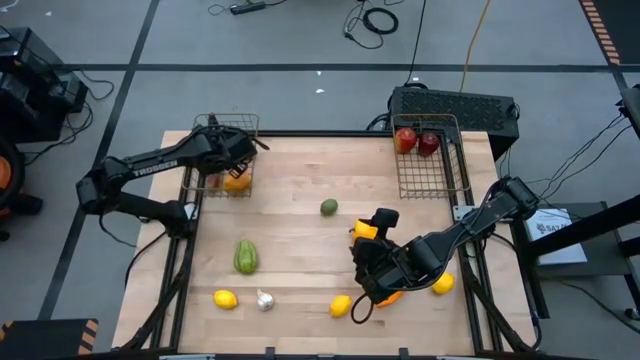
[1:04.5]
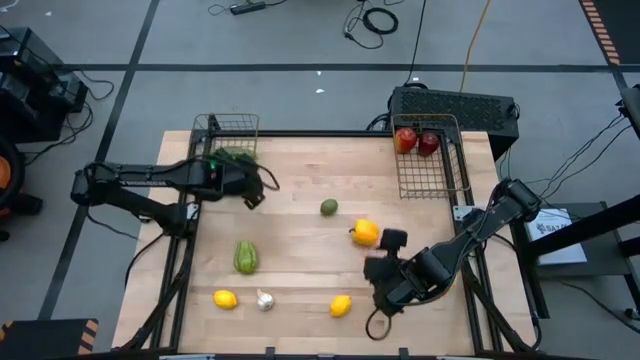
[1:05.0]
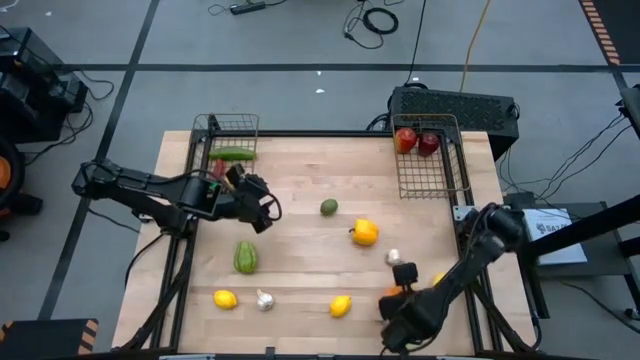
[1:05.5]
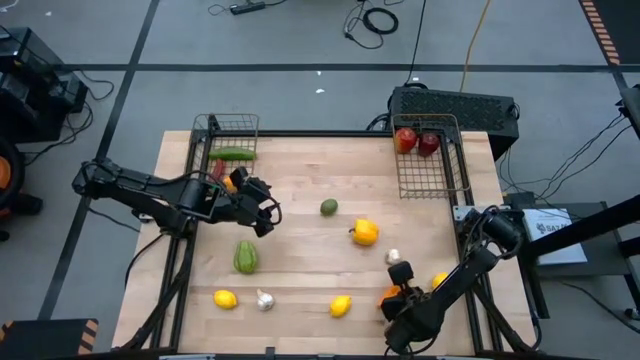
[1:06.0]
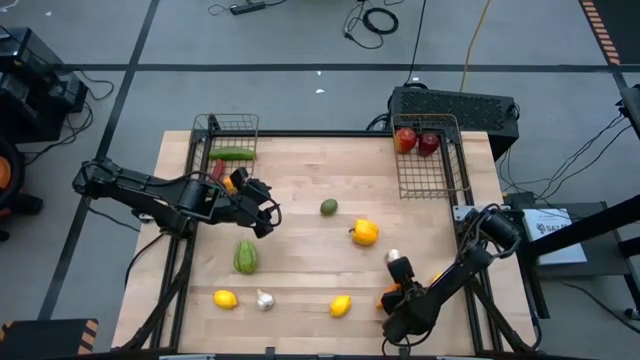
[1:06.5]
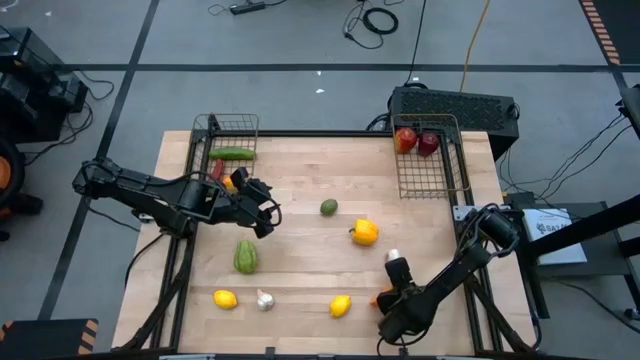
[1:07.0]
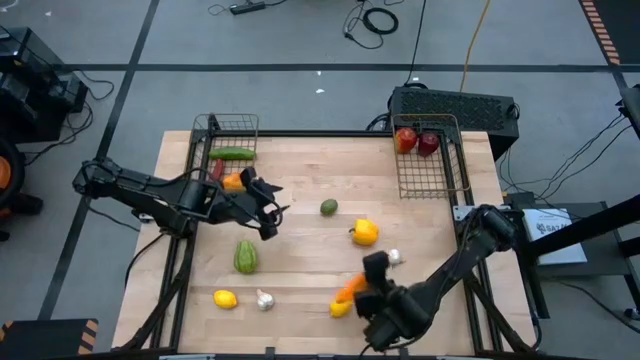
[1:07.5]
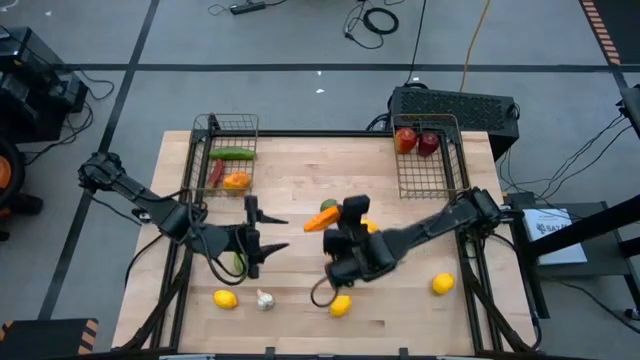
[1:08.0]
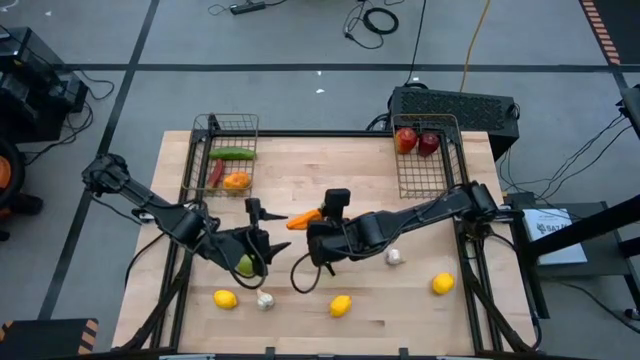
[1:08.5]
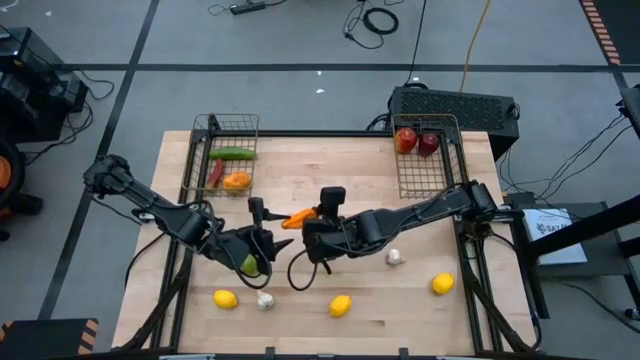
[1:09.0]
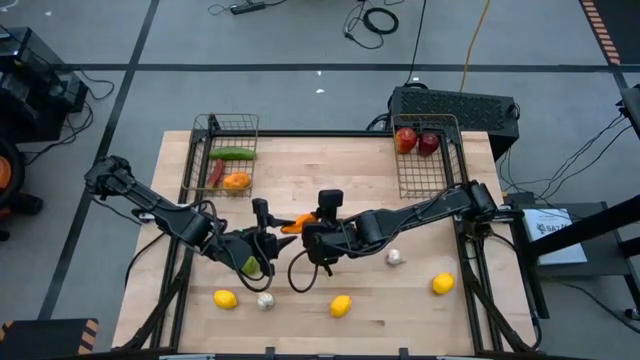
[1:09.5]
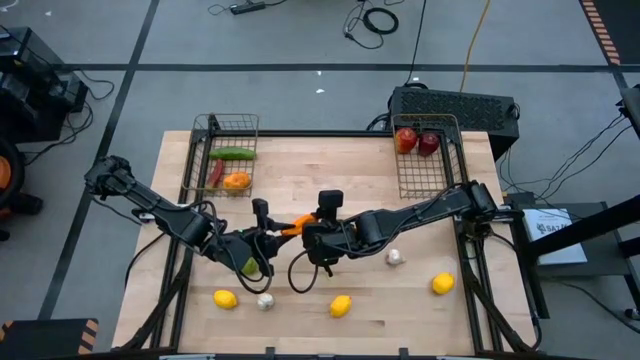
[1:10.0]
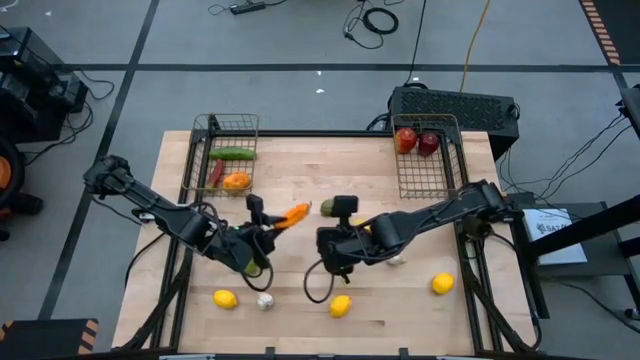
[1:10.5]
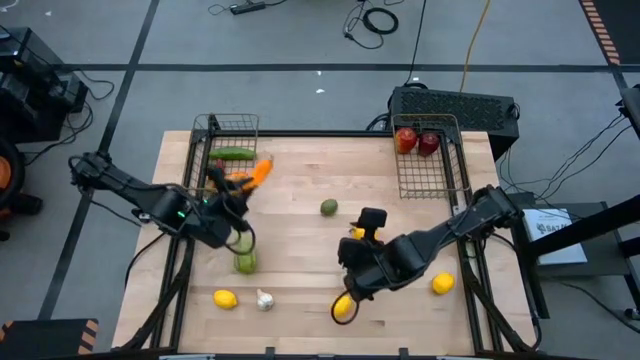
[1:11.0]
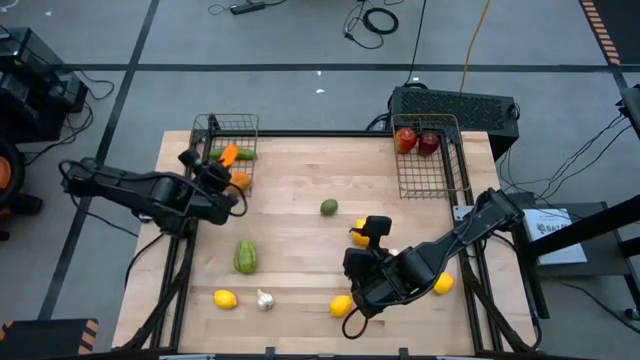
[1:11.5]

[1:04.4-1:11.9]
Task: Sort produce into baskets
Put the orange chili pepper into the left wire basket

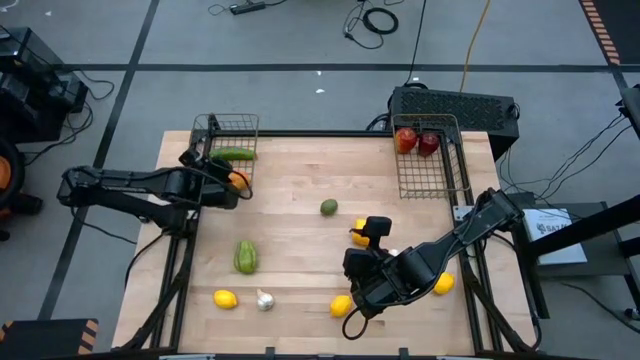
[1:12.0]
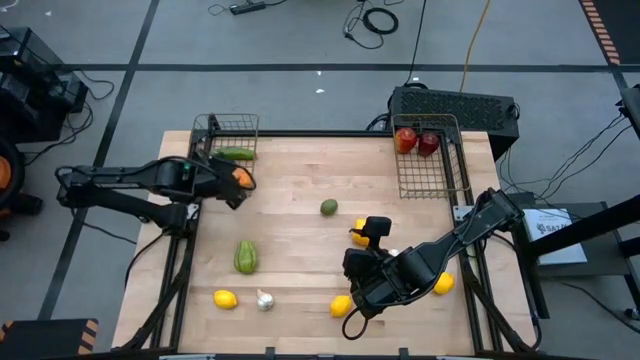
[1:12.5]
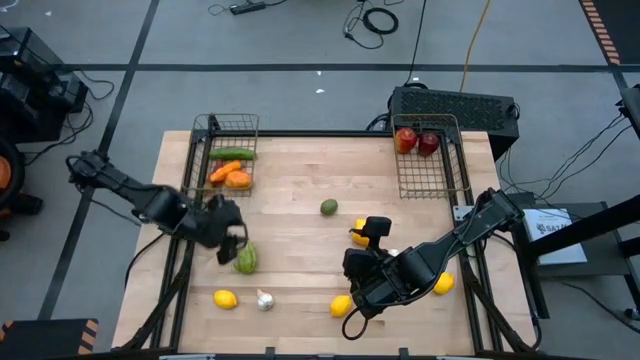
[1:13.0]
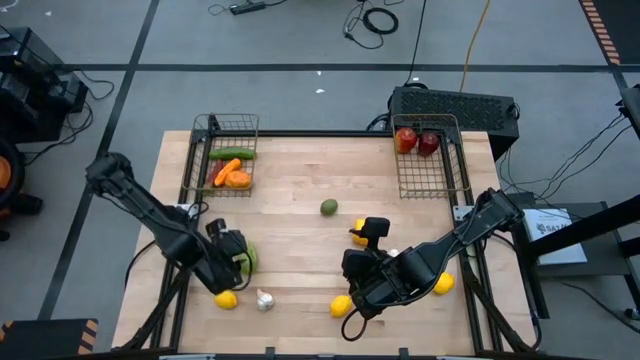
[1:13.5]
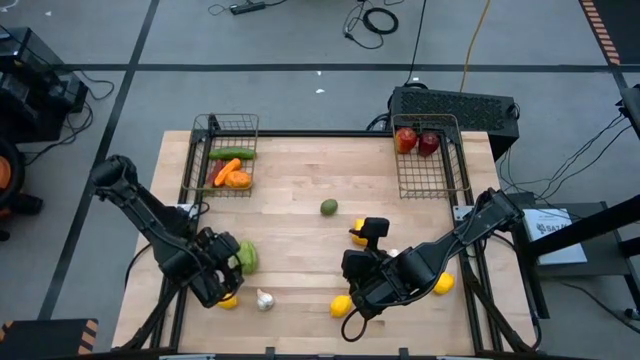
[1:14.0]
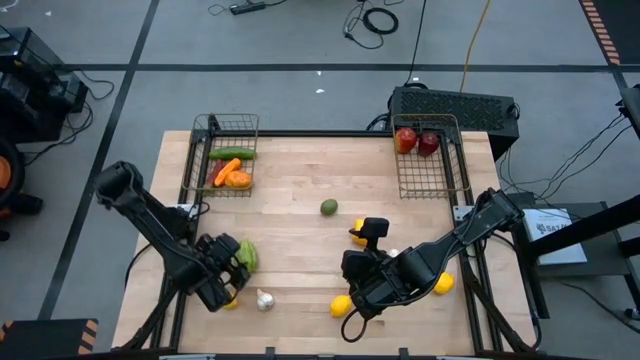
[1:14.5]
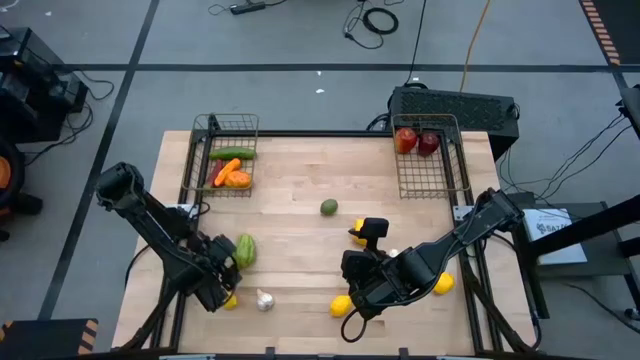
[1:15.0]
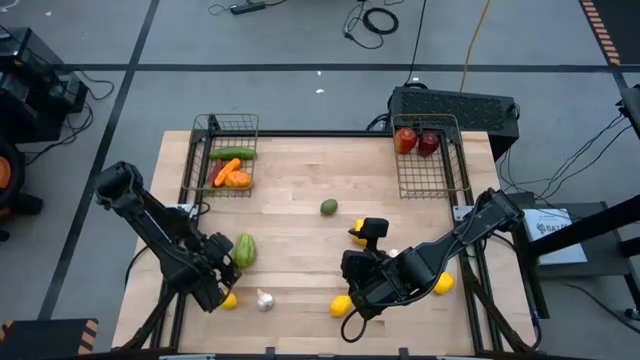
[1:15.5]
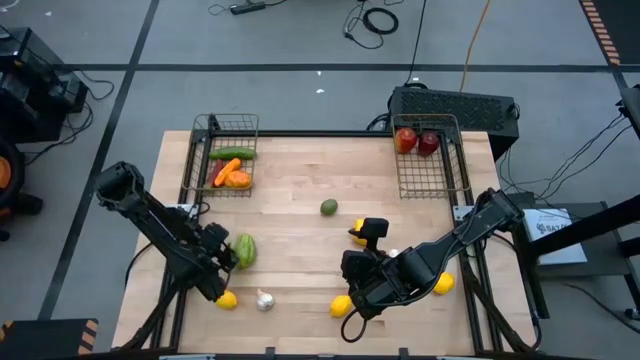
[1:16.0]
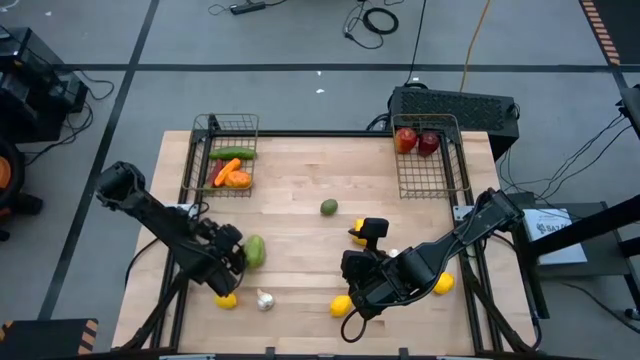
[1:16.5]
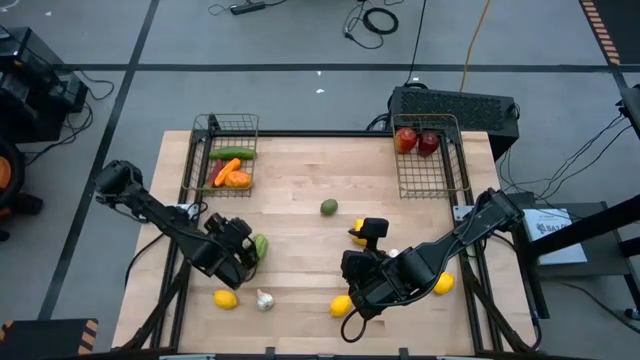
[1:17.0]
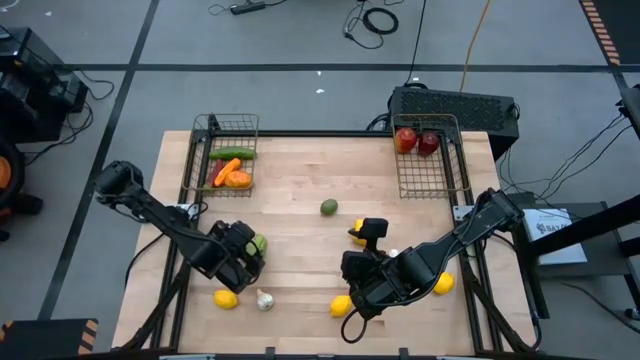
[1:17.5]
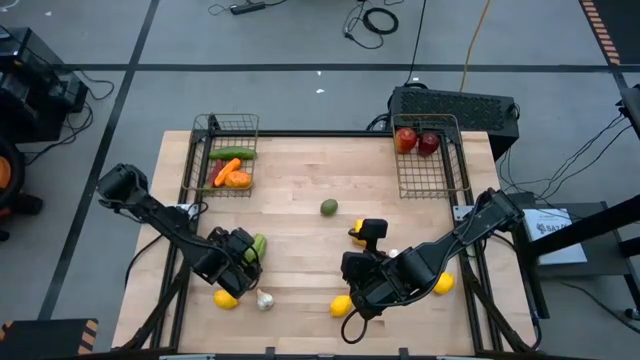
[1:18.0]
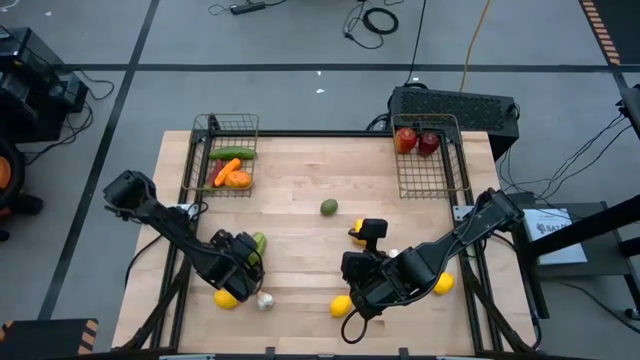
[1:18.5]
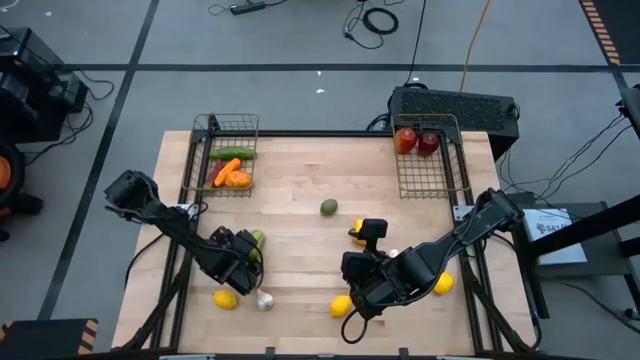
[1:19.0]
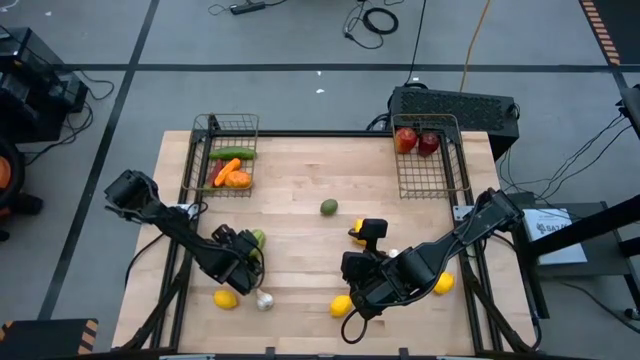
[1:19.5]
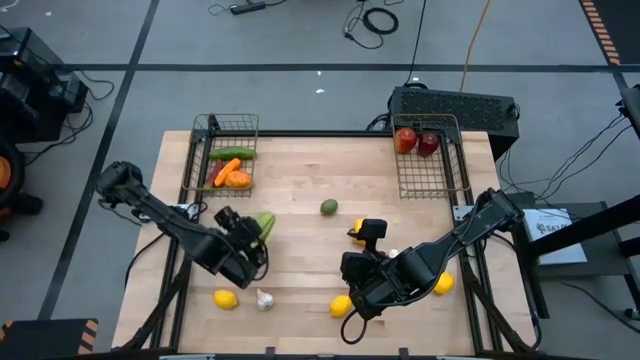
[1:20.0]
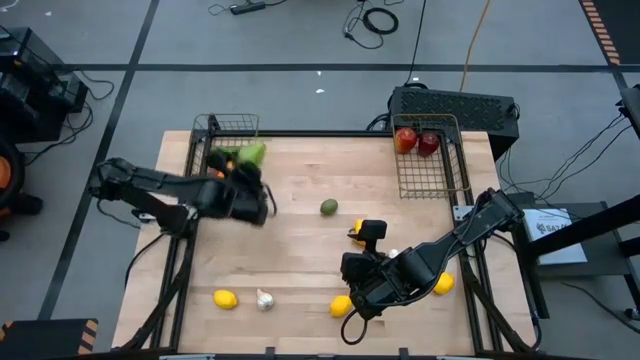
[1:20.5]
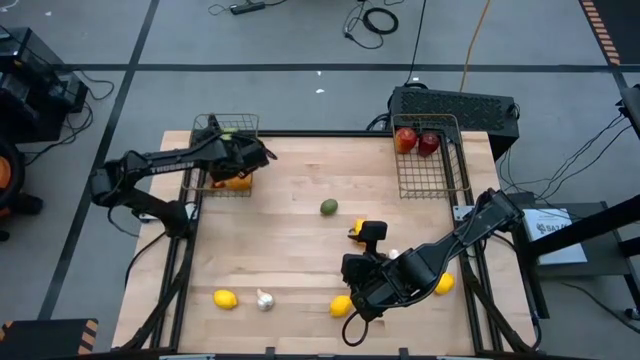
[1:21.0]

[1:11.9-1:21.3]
Put the green chayote into the left wire basket

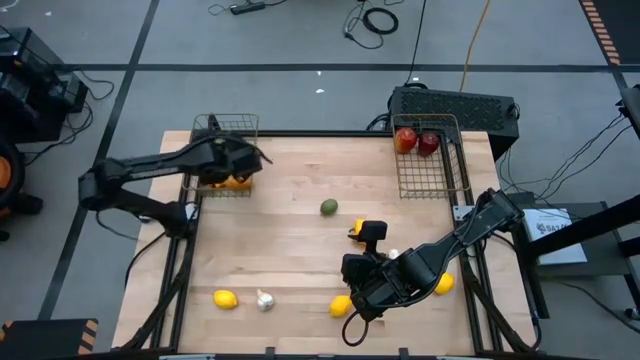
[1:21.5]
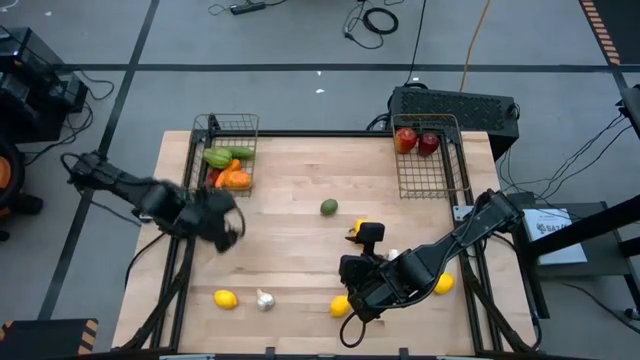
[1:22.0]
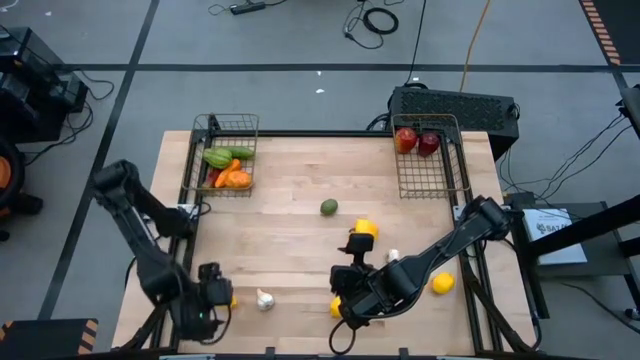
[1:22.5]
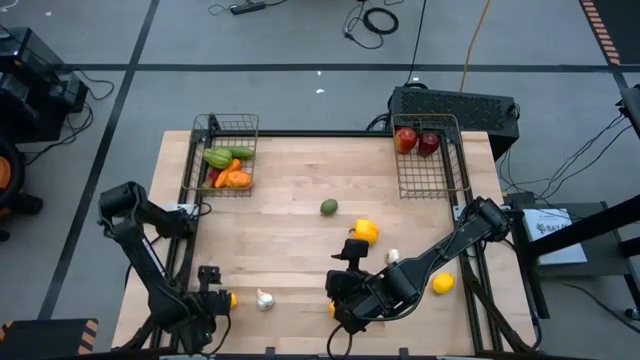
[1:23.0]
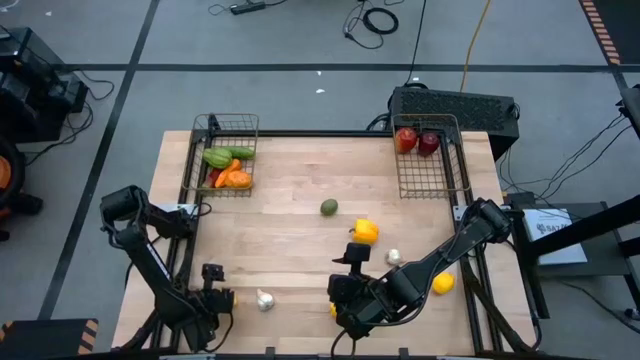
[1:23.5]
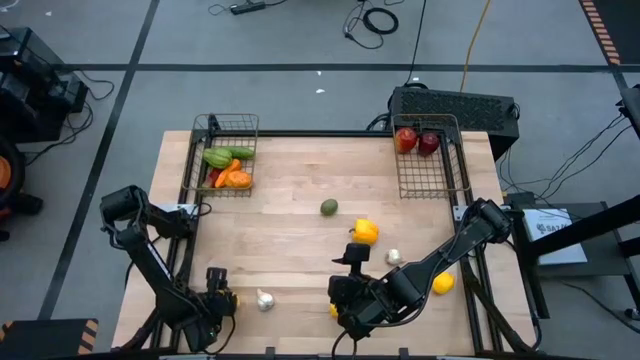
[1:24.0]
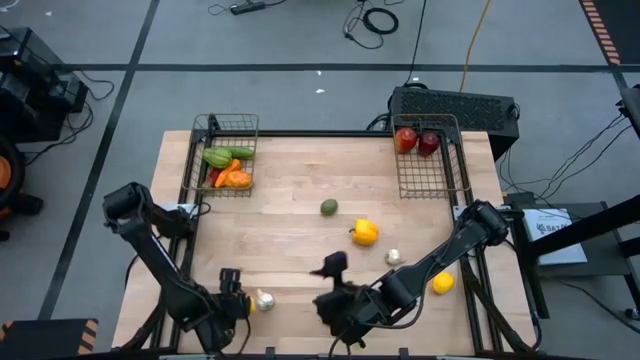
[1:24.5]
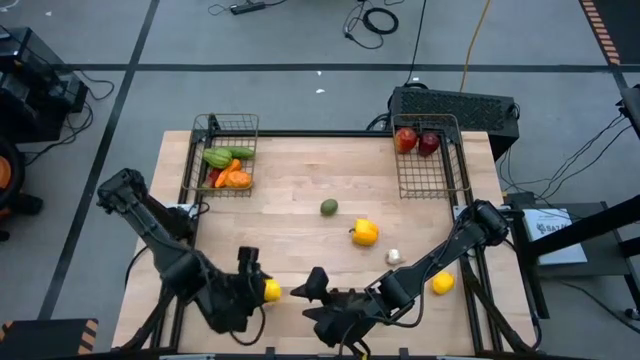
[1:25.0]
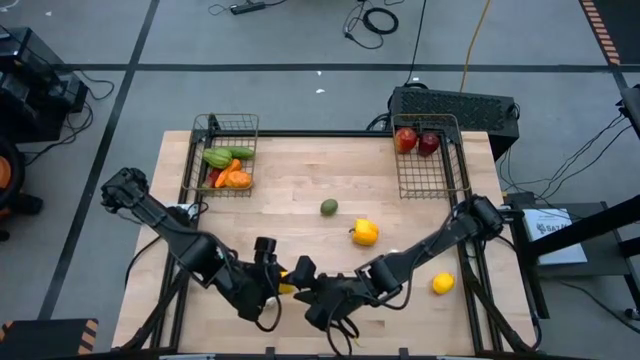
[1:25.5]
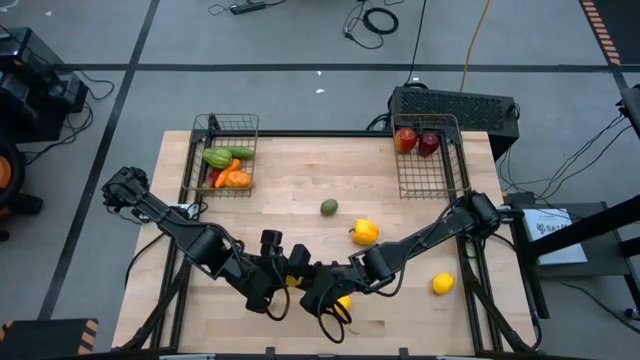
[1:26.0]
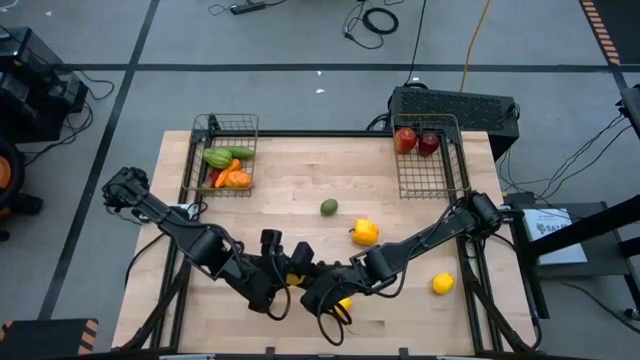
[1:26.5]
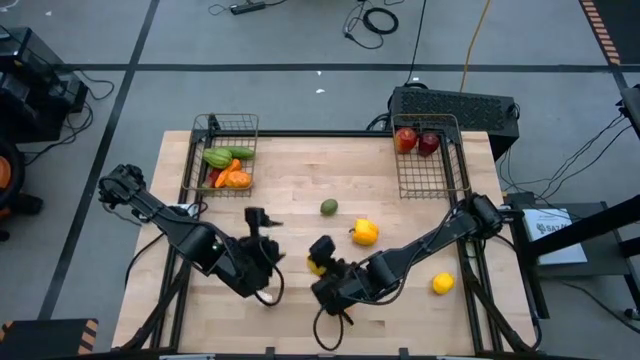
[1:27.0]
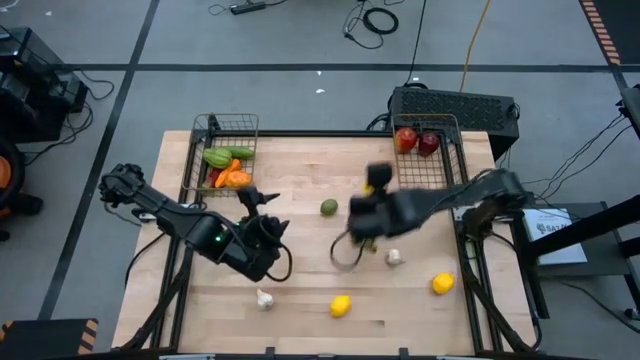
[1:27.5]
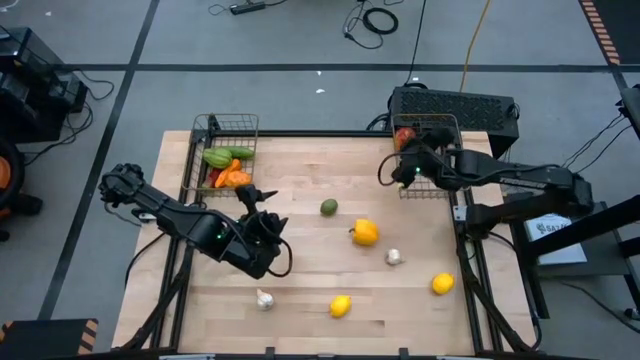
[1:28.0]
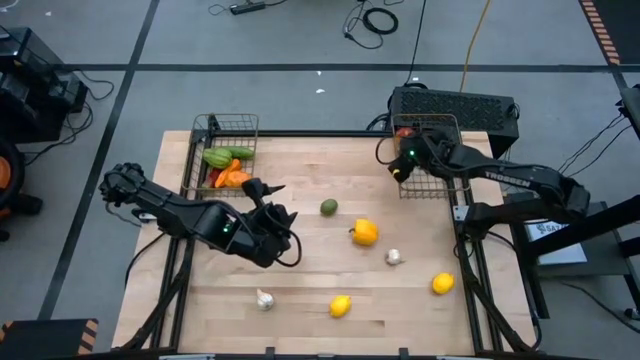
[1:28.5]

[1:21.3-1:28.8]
Put the left yellow lemon into the right wire basket
